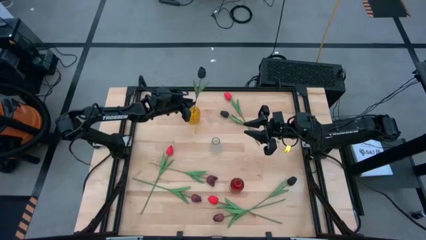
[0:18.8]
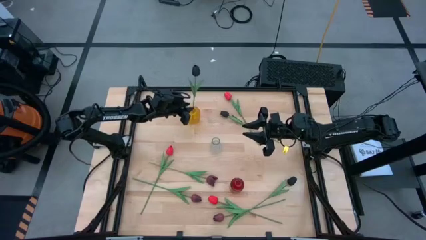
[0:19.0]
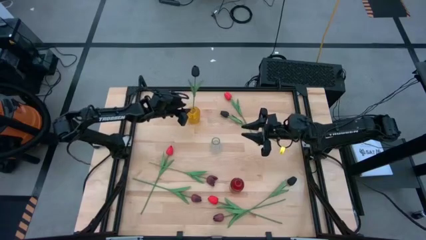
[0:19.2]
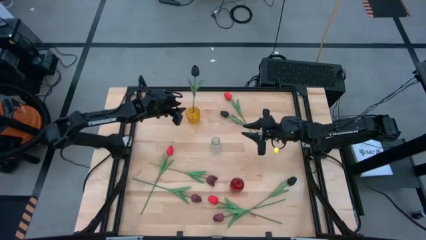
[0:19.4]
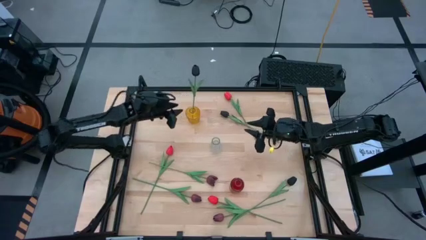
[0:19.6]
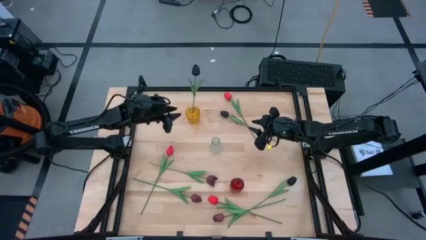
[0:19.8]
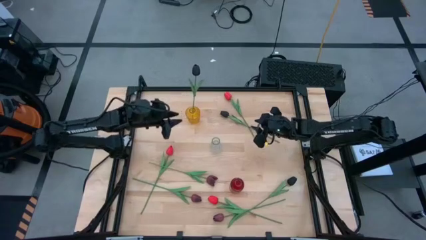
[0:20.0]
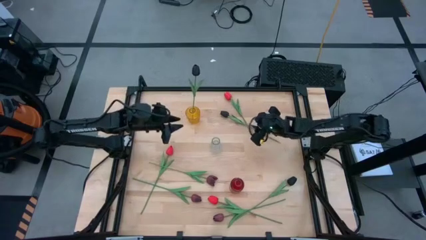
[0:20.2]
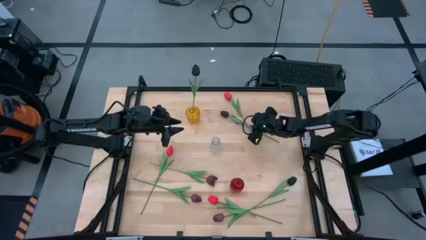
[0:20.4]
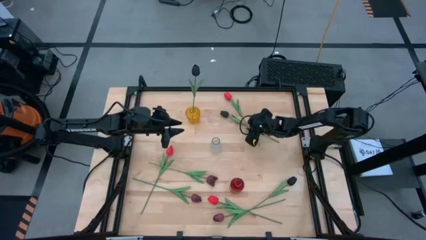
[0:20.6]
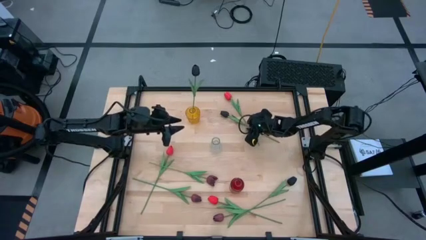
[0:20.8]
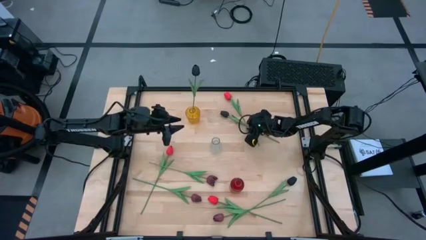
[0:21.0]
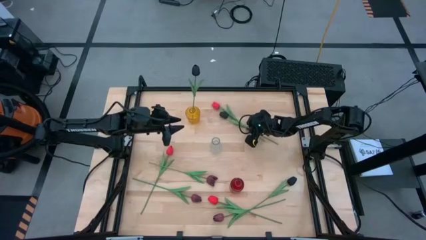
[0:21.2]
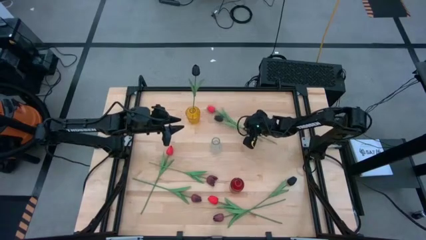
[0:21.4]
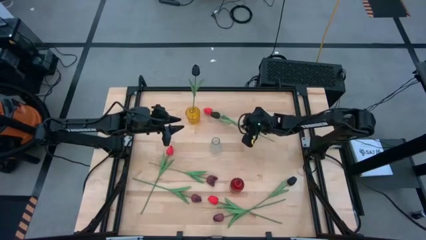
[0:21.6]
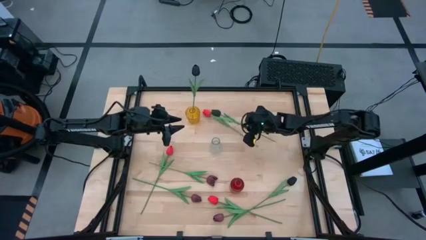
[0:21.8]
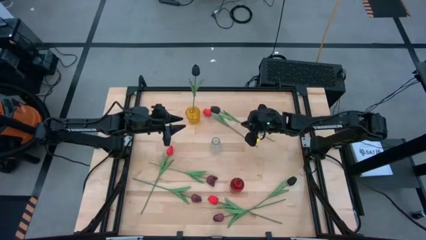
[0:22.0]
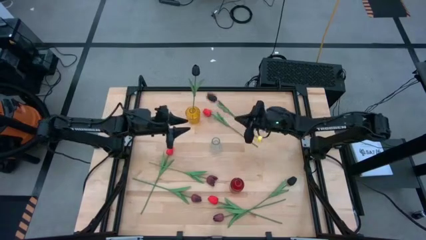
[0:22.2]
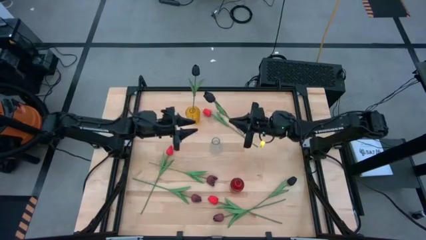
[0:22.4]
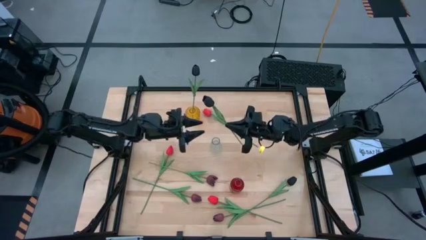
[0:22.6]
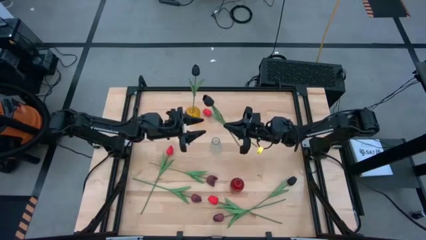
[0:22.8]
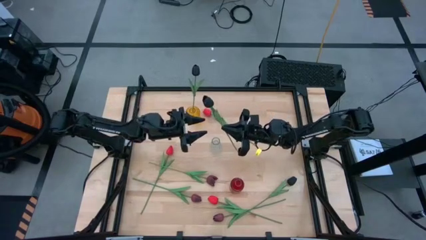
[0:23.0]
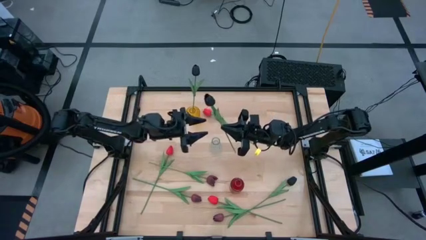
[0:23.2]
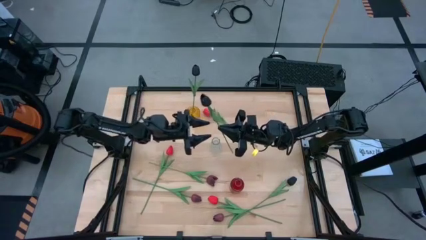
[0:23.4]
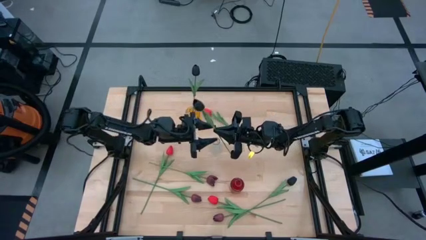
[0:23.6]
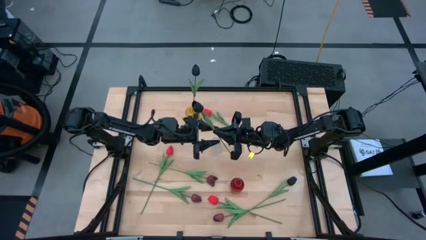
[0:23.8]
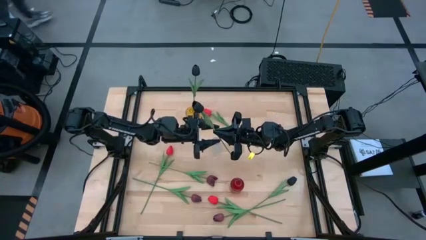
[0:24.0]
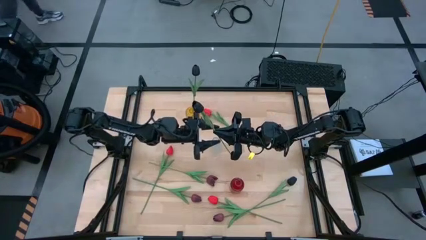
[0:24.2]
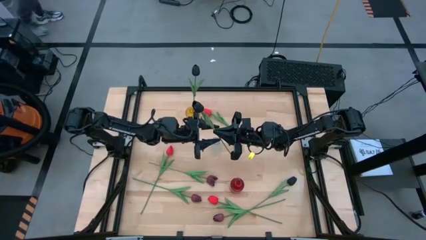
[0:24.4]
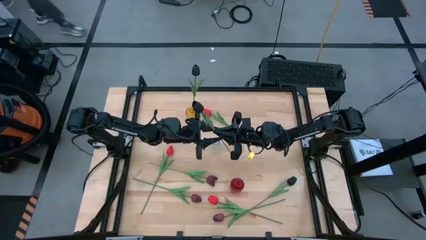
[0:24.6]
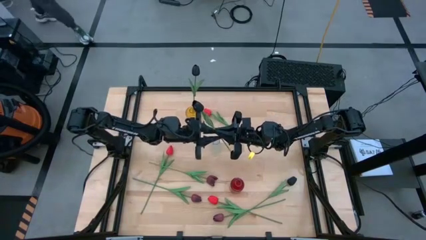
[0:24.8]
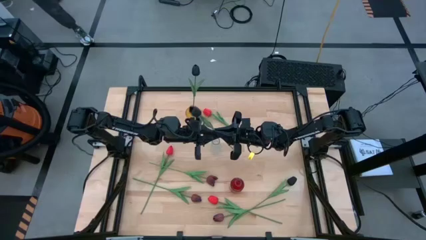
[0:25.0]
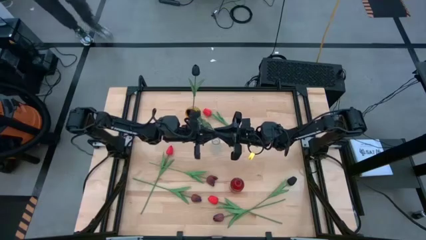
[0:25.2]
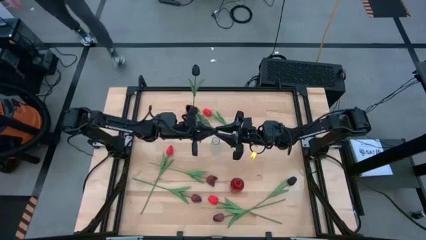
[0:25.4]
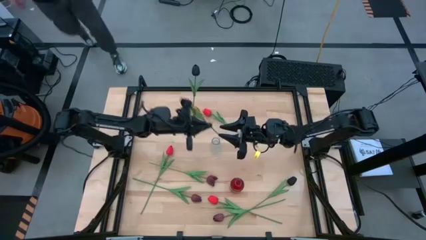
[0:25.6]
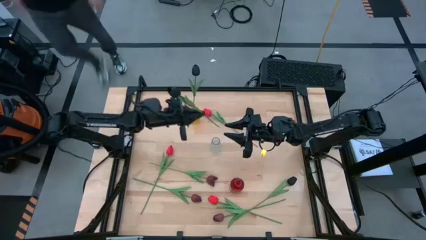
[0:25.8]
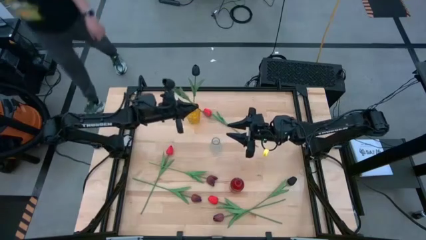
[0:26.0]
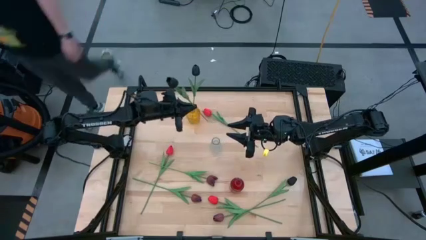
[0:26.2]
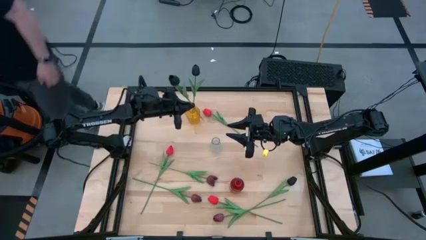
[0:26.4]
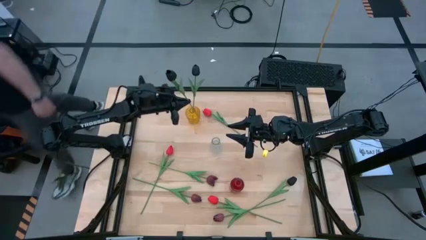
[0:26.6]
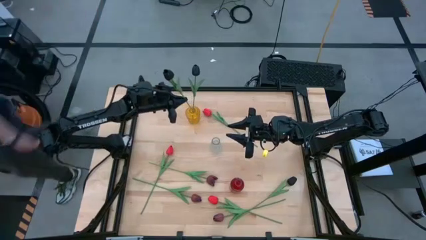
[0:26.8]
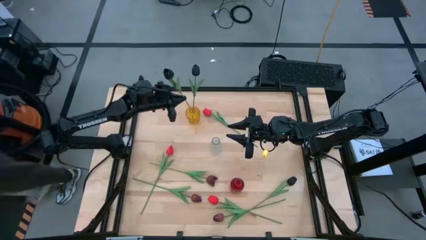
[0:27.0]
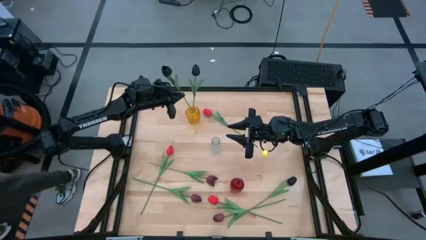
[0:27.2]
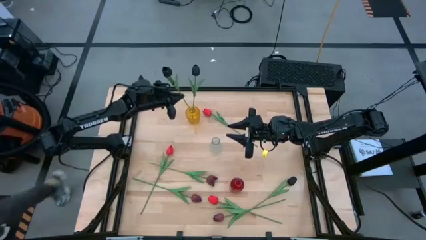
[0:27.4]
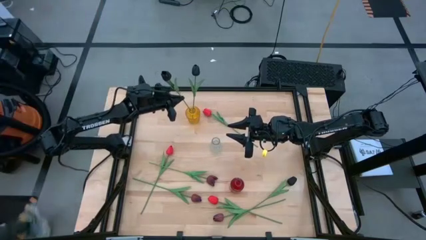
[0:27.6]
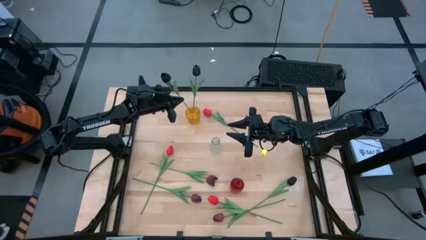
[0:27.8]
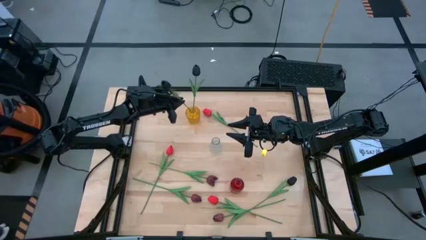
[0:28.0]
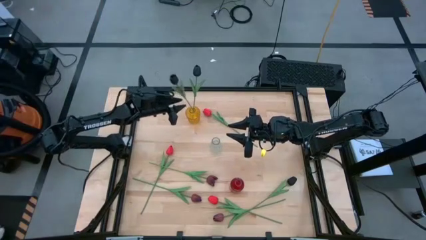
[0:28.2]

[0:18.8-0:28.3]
Task: Sort flowers into vase by color
Put the top black tulip into the yellow vase

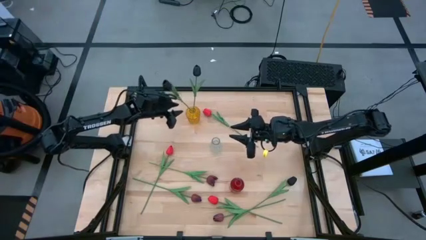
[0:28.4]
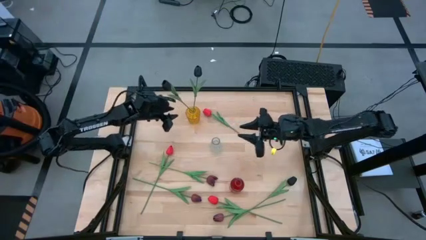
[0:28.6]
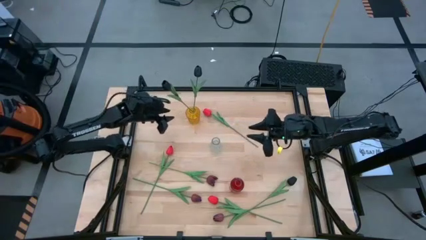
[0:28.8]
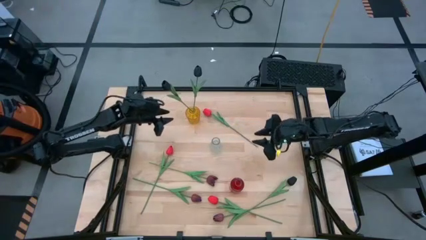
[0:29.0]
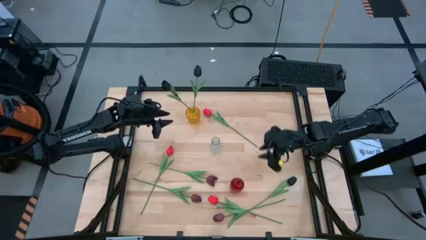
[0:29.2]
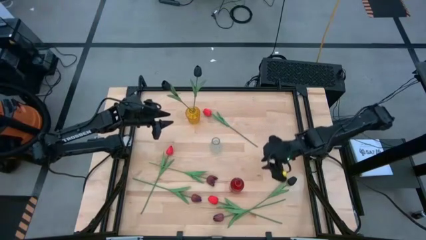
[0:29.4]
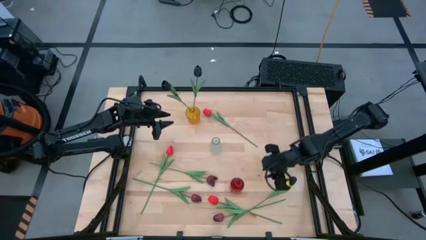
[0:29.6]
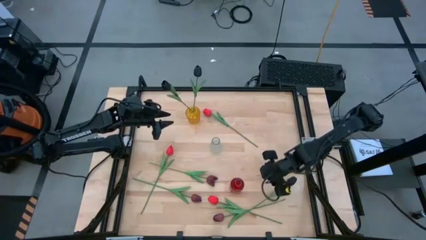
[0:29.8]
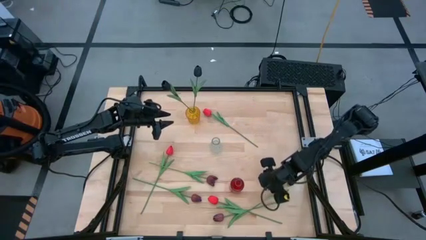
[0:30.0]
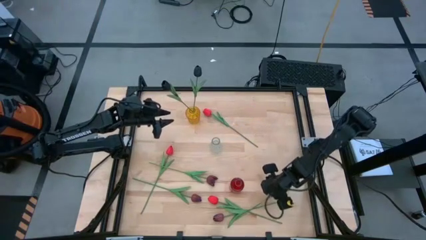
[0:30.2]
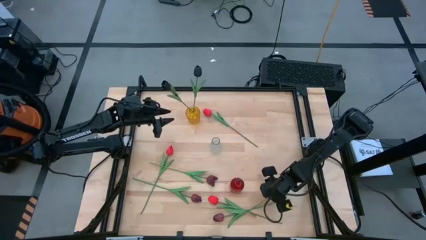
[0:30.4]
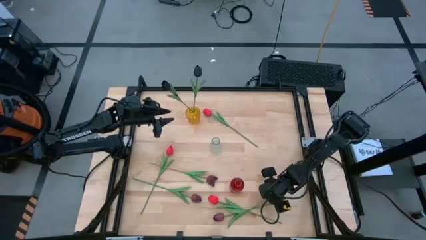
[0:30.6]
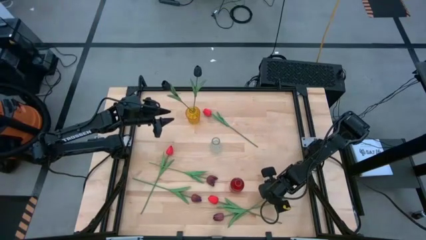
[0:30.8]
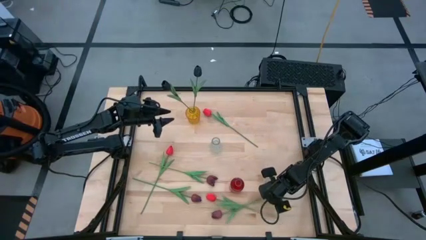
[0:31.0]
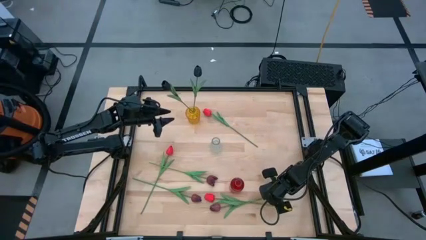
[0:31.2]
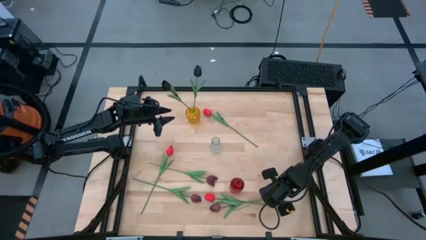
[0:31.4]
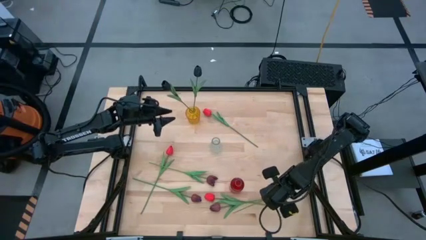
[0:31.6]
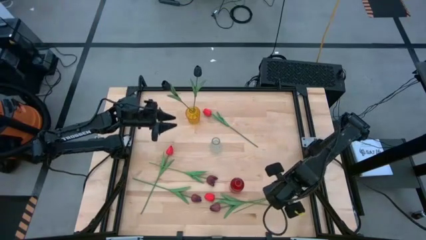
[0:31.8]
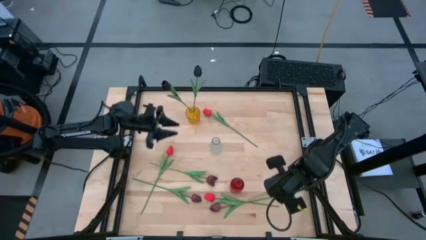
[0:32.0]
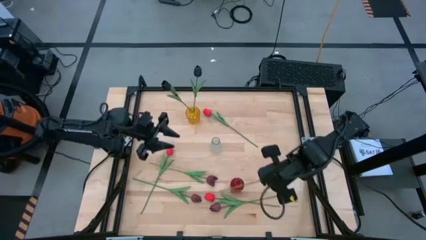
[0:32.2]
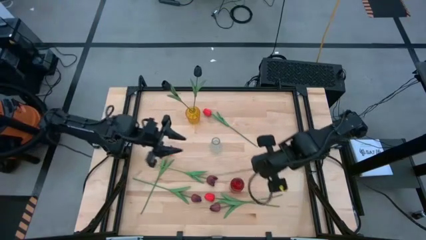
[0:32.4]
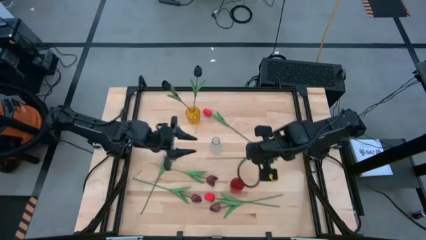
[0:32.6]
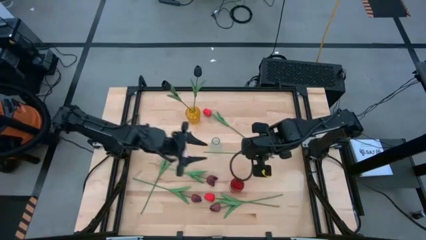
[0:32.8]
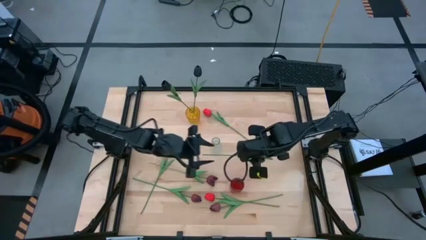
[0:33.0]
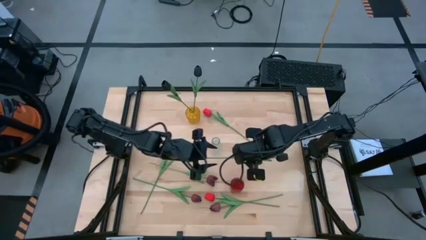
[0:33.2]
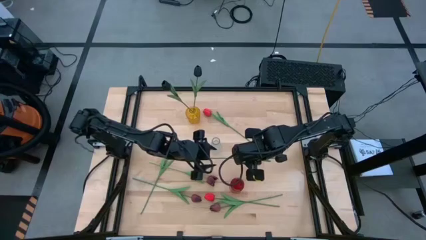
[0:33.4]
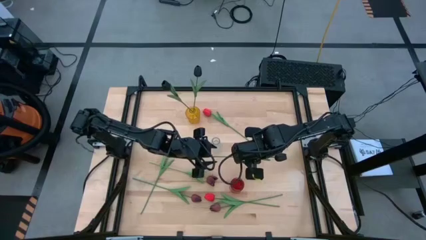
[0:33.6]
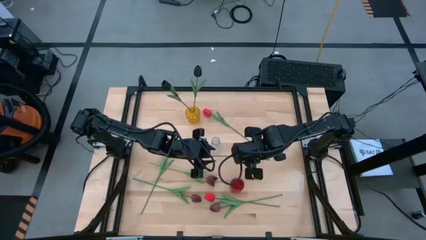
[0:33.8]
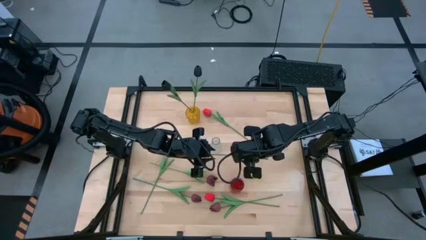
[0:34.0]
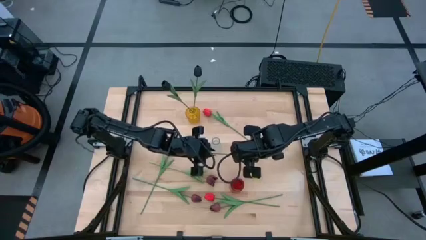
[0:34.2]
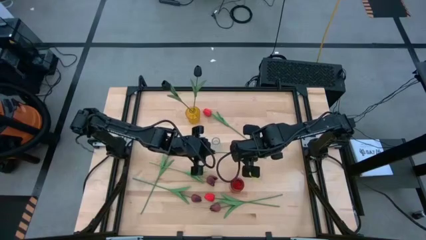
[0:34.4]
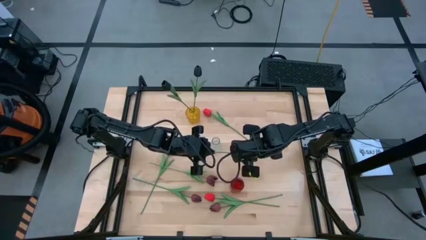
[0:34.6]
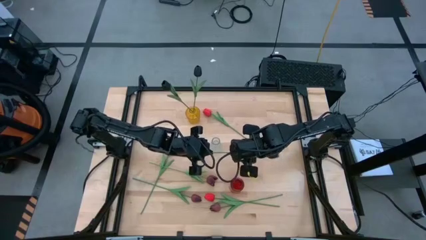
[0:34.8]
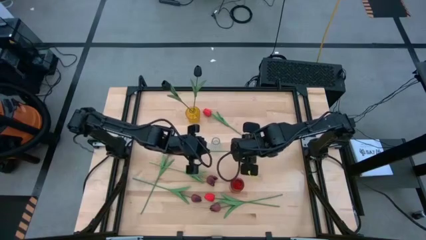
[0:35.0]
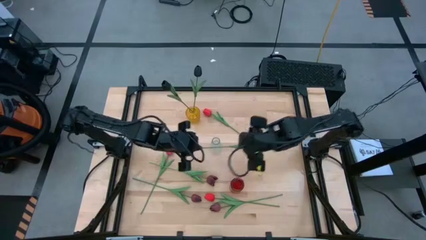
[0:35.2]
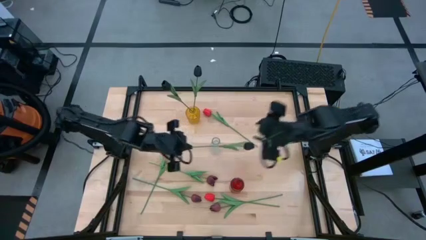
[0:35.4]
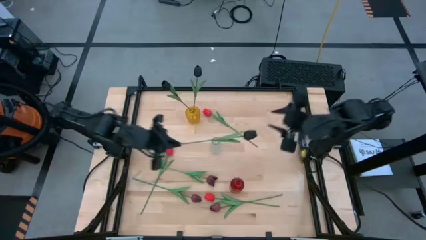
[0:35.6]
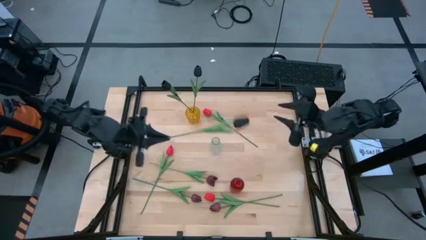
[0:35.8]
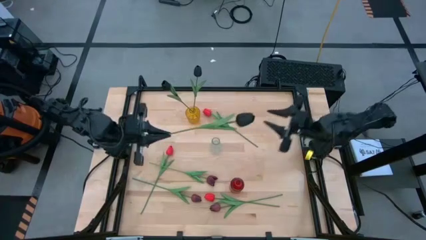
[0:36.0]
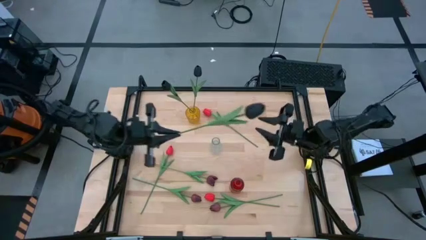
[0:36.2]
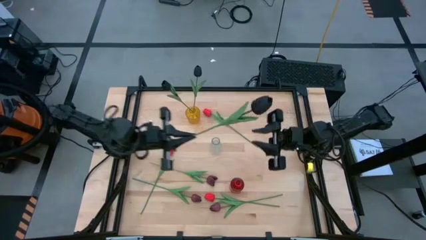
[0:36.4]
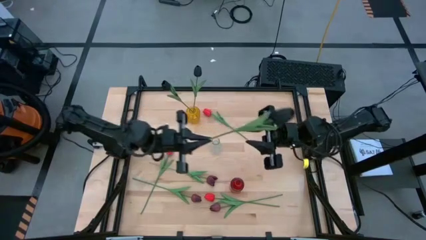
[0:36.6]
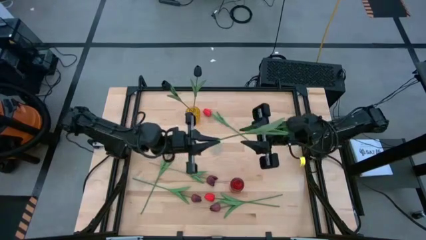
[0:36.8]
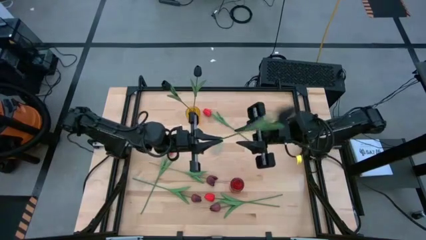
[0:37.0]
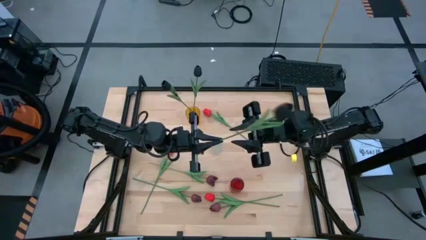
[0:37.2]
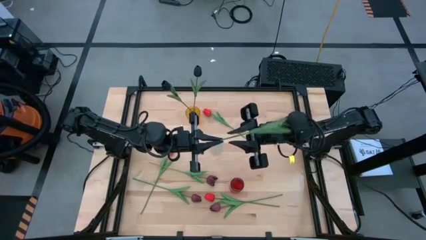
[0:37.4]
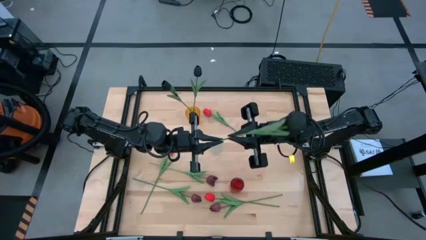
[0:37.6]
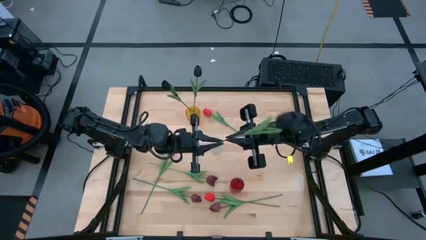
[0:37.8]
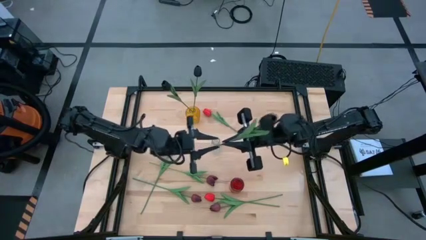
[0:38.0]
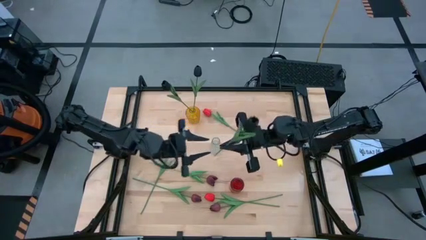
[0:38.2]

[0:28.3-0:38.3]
Put the black tulip into the yellow vase
